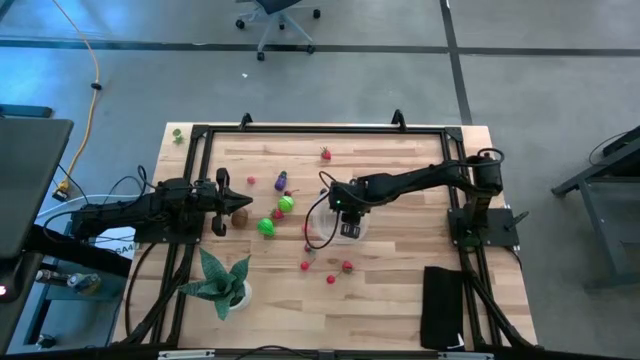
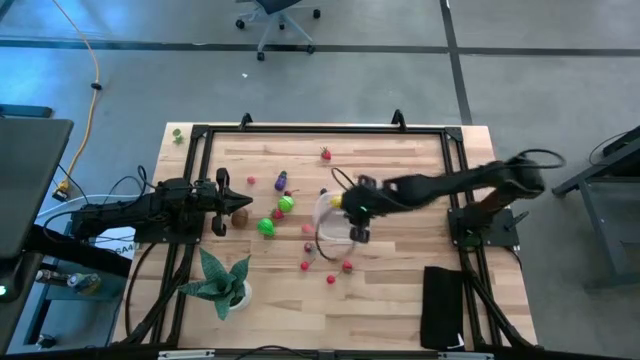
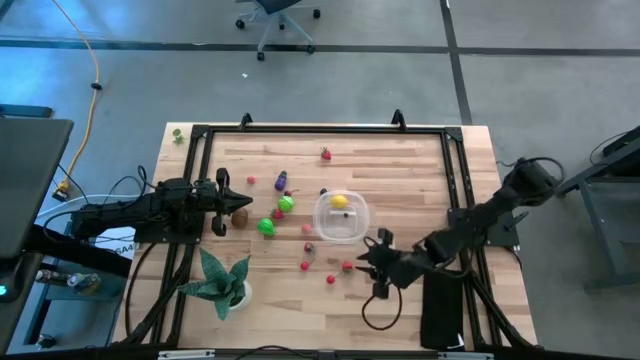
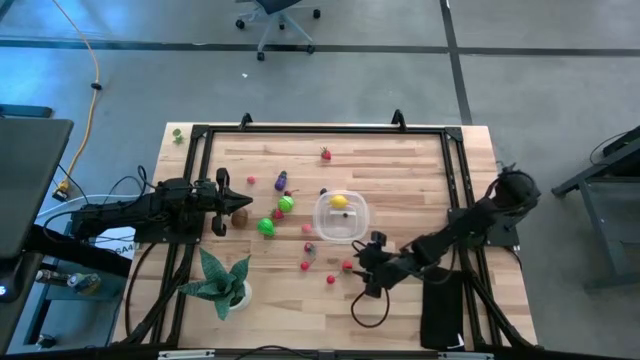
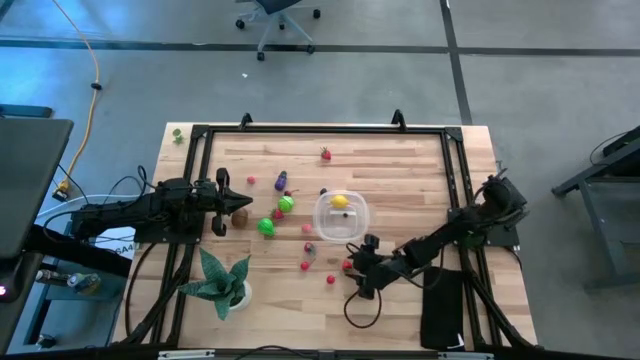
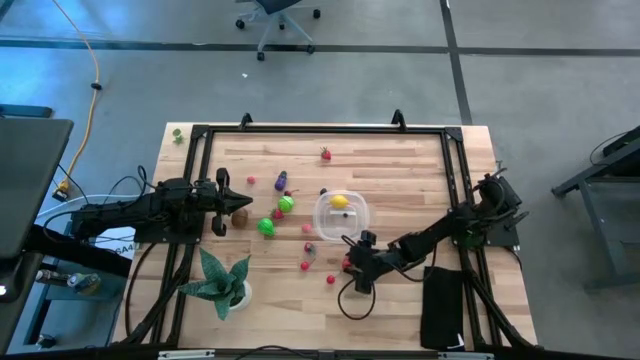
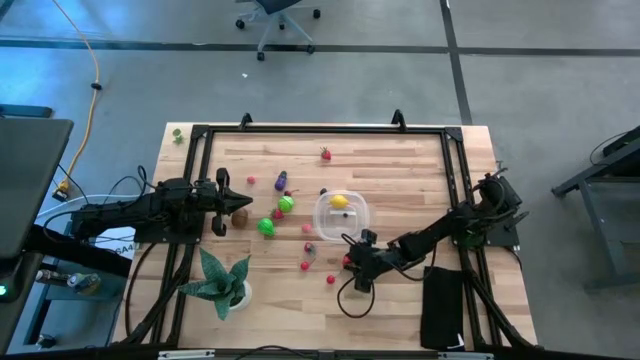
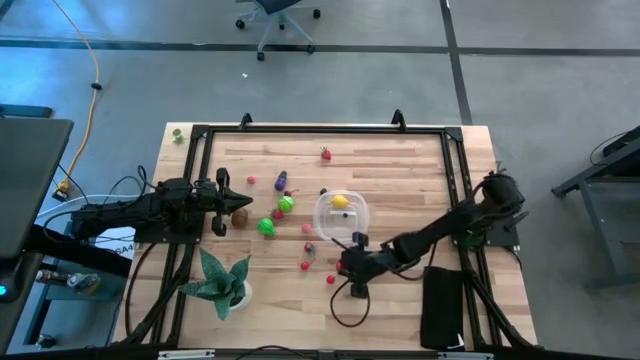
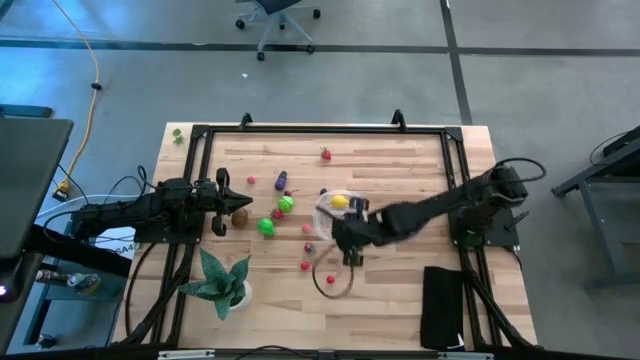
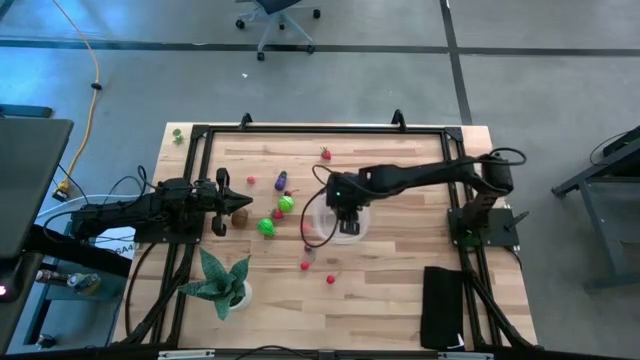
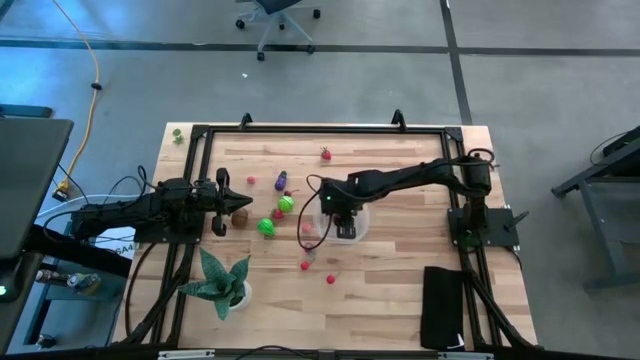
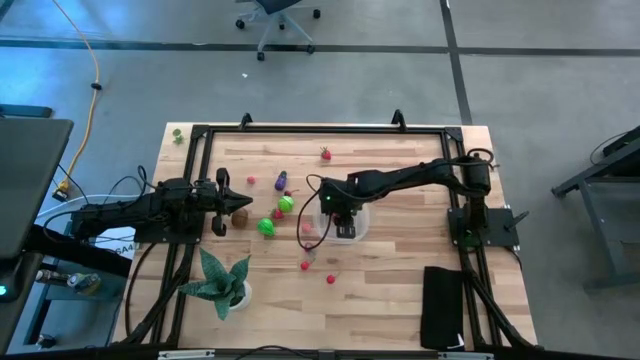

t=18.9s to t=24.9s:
Task: Pick and placing Produce into tupperware
Put the red strawberry into the transparent container

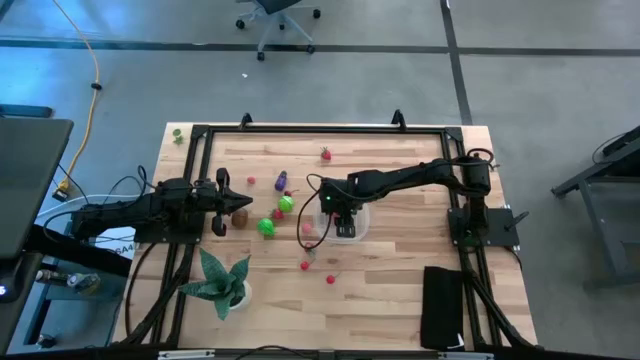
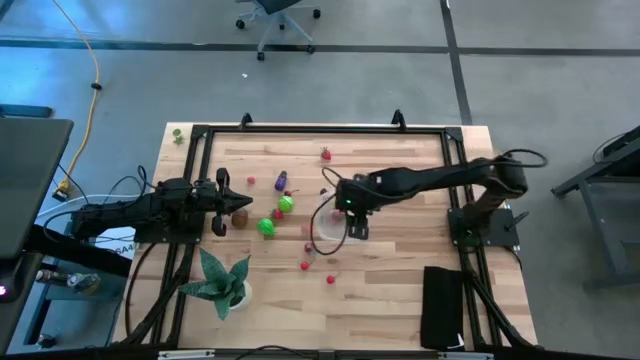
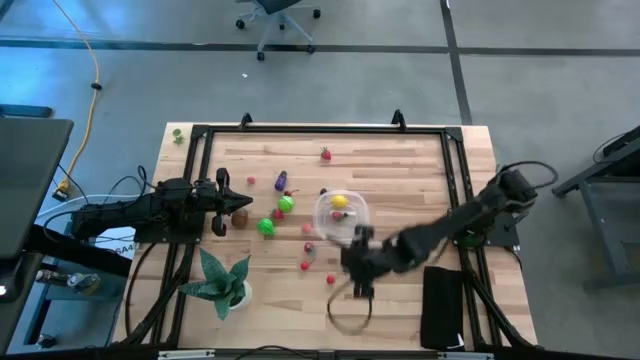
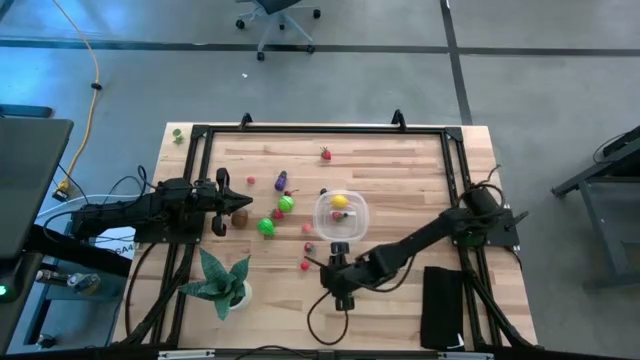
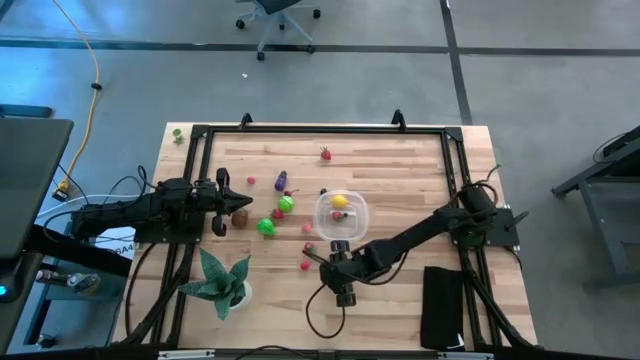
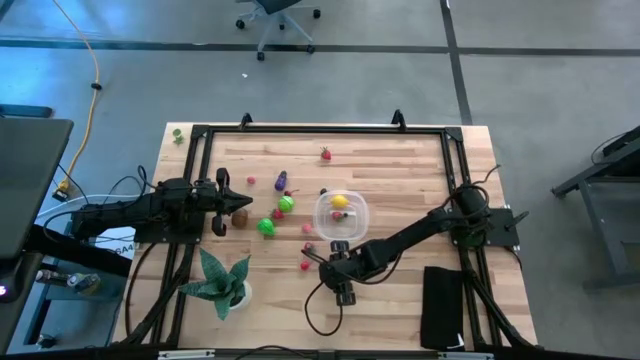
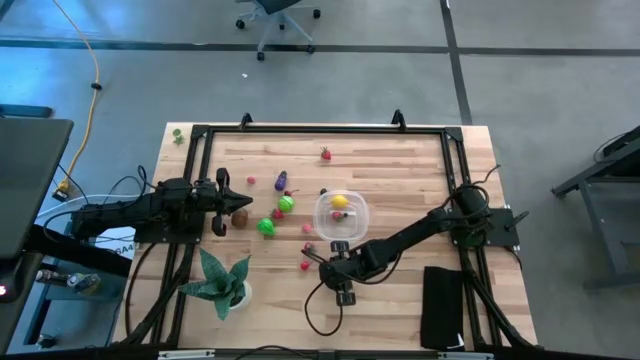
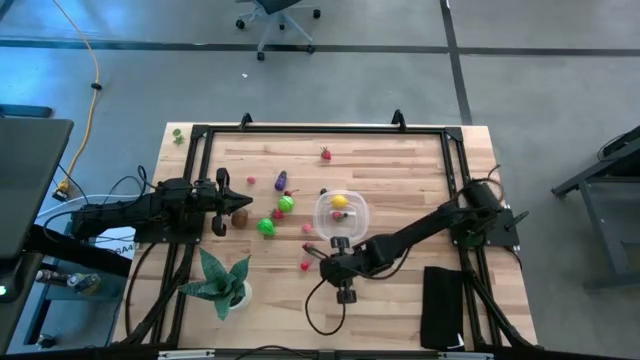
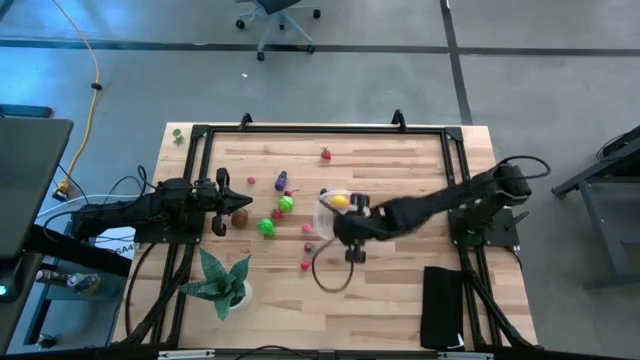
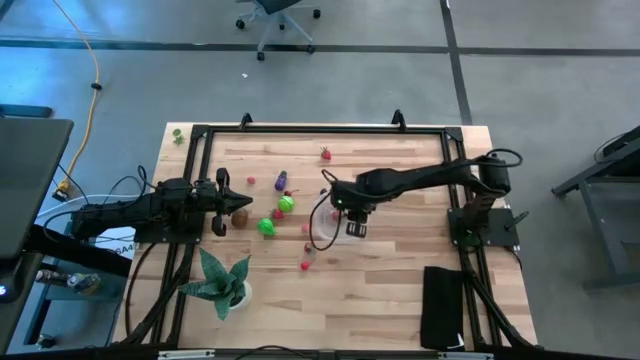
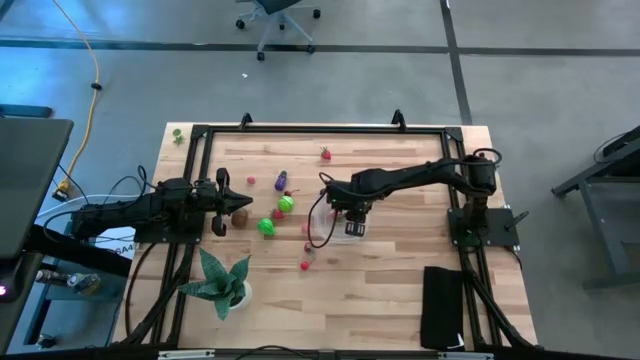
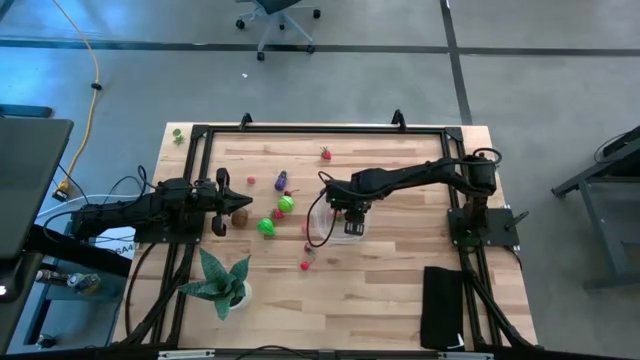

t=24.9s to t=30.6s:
Put the red cherry into the transparent container

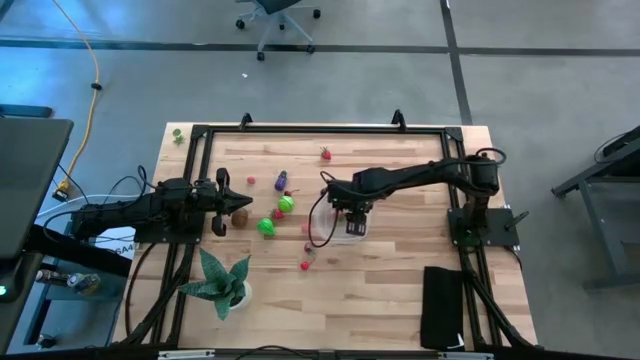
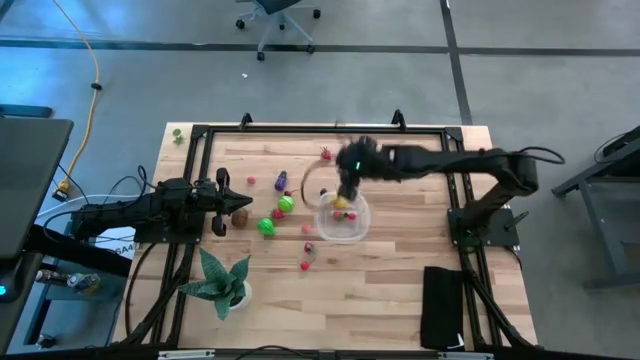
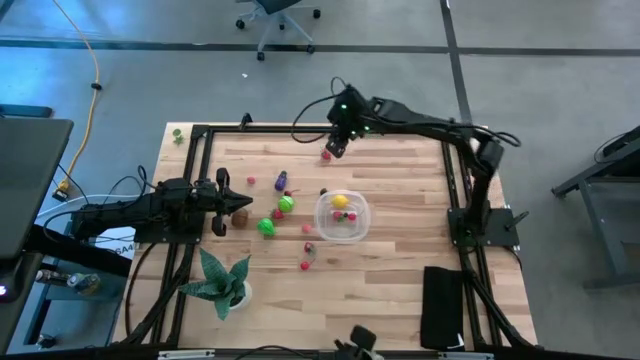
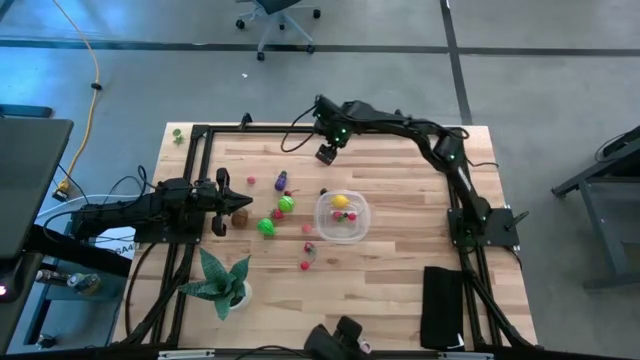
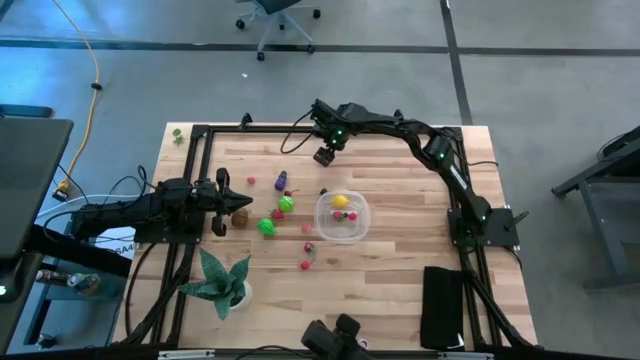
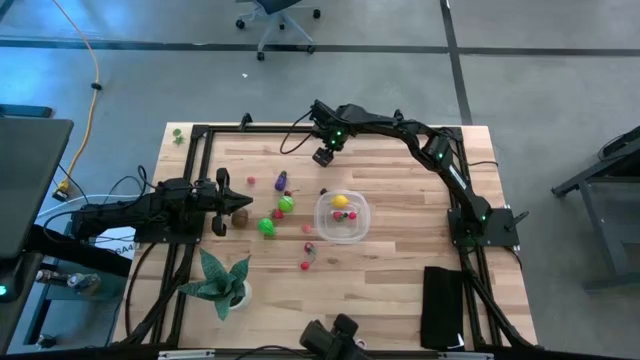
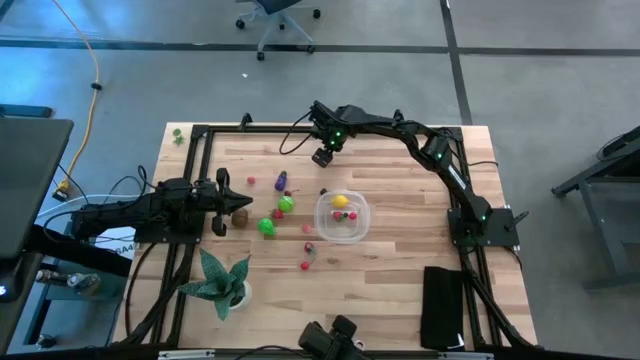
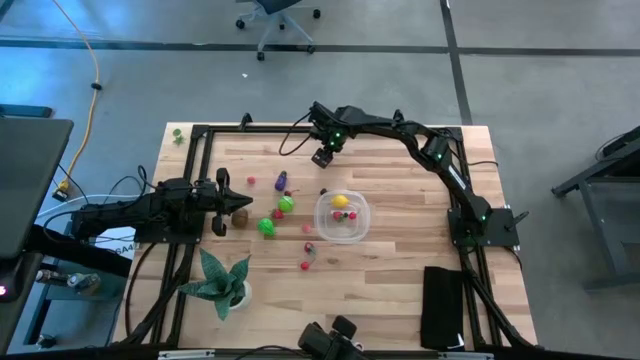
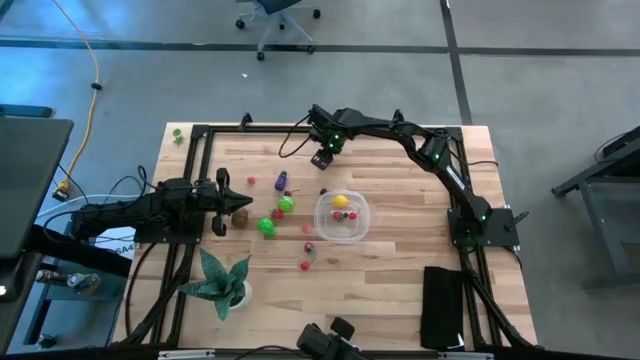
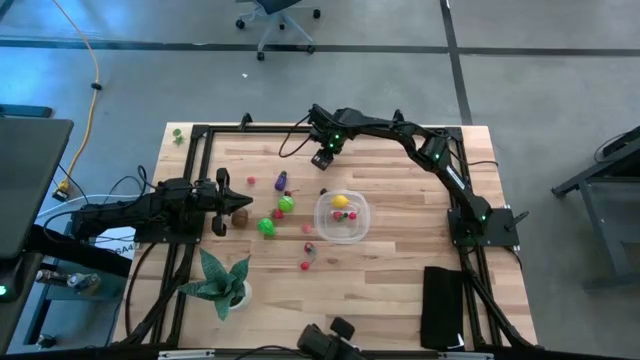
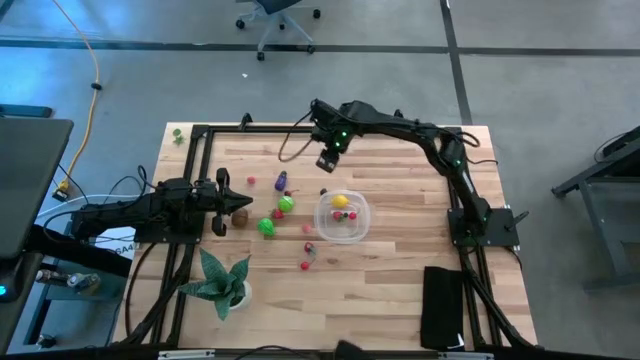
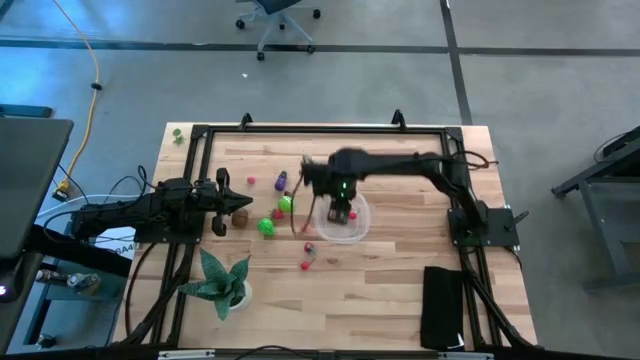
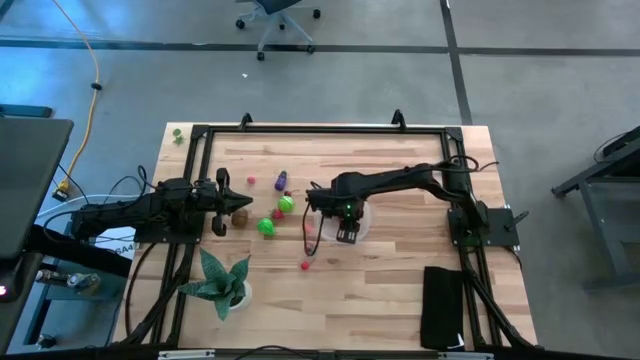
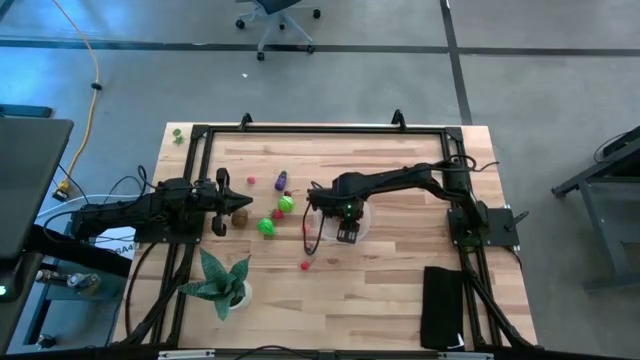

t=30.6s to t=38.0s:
Put the red strawberry into the transparent container

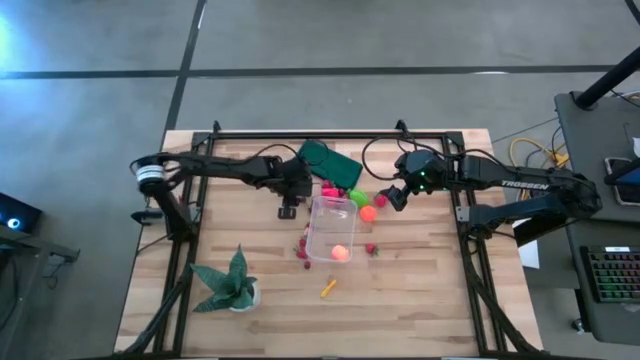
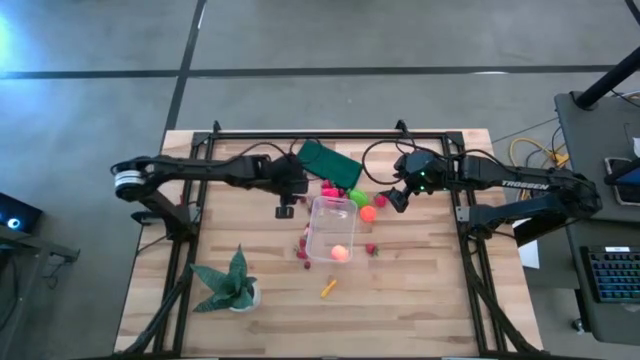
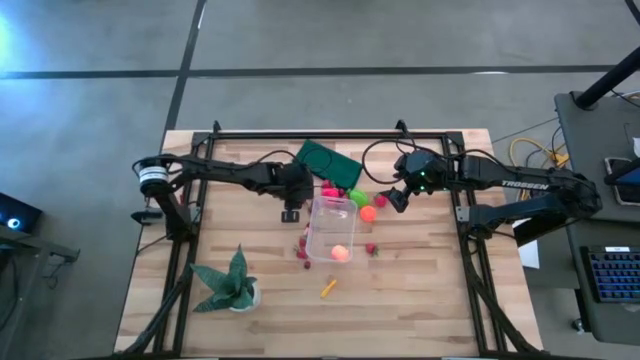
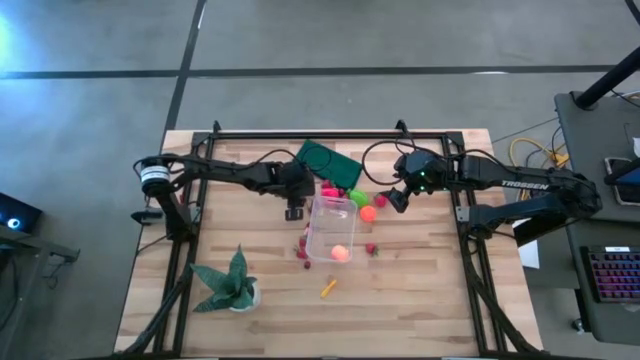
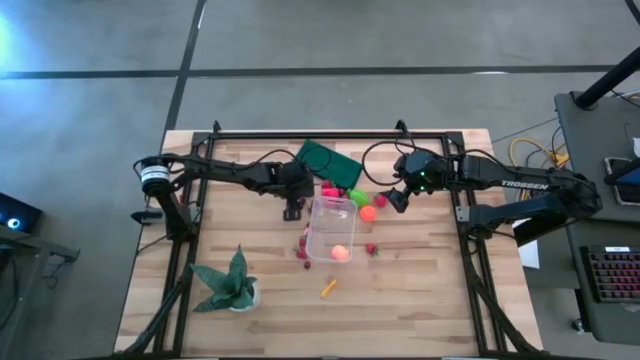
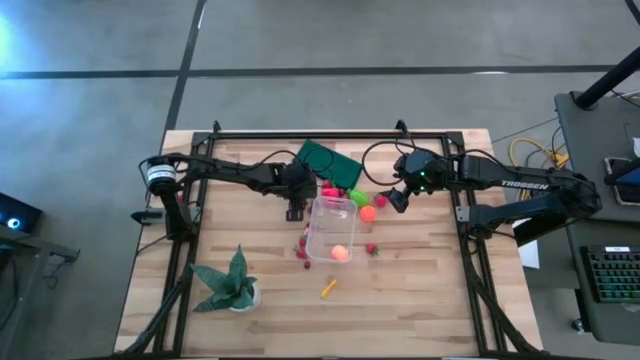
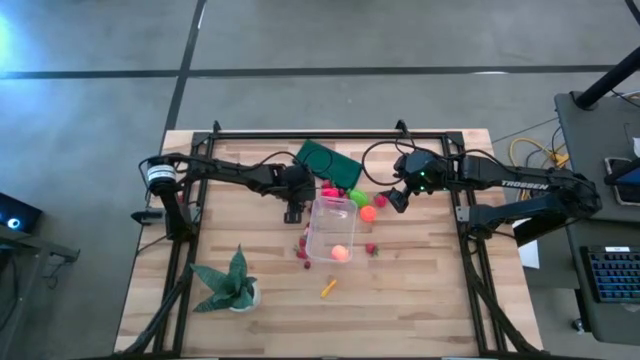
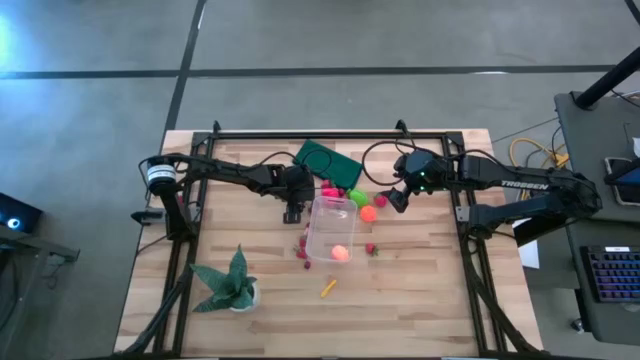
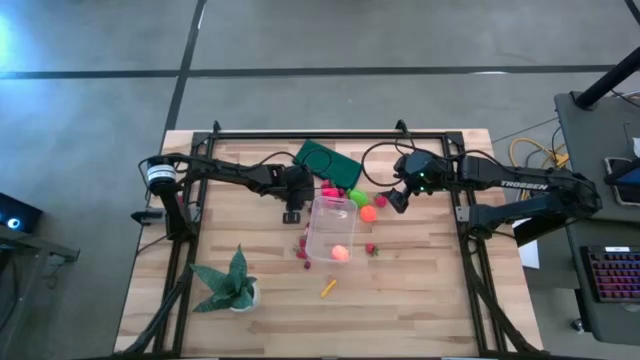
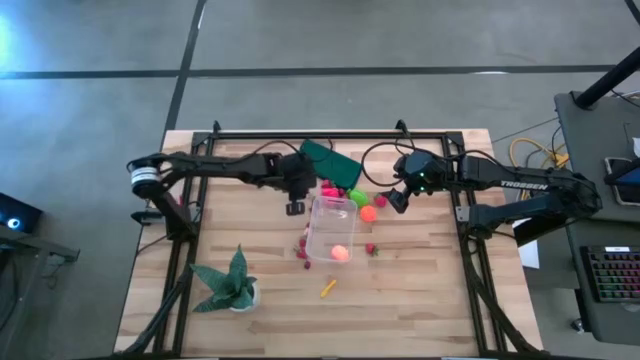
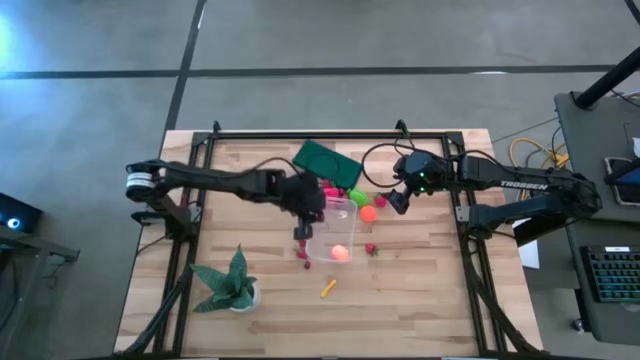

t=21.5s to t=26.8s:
Task: Pick and placing Produce into tupperware
Put the red cherry into the transparent bin
